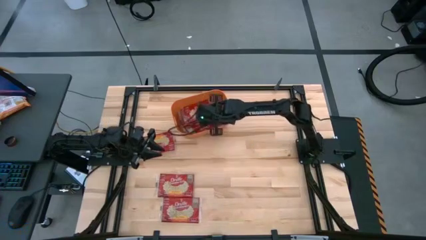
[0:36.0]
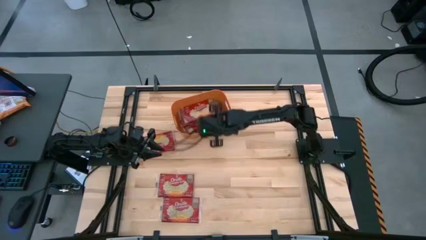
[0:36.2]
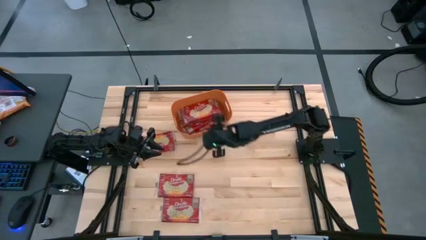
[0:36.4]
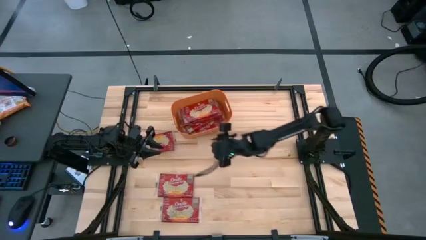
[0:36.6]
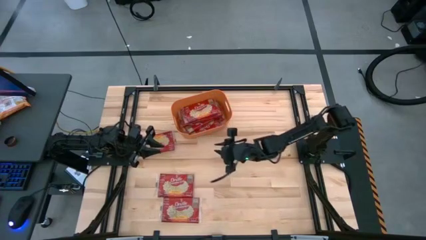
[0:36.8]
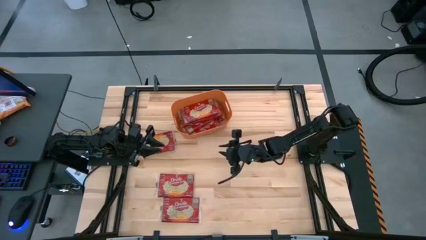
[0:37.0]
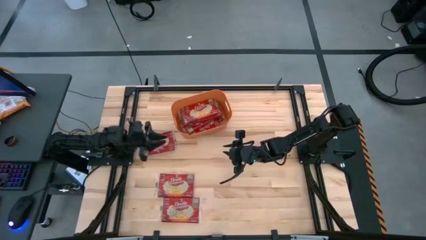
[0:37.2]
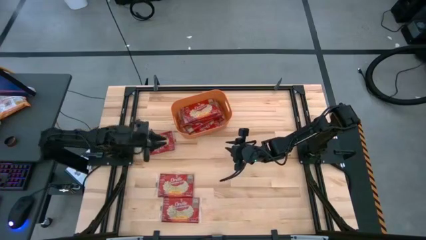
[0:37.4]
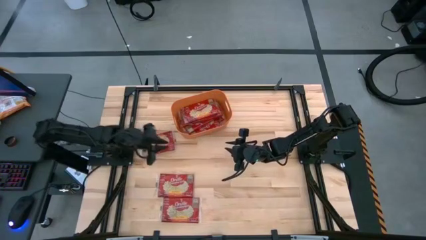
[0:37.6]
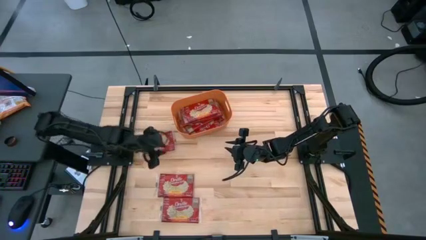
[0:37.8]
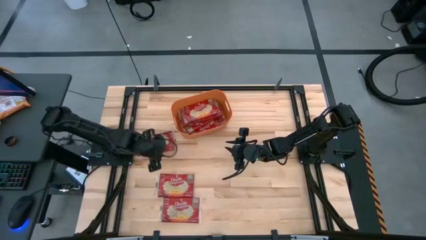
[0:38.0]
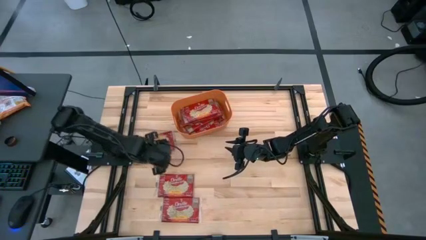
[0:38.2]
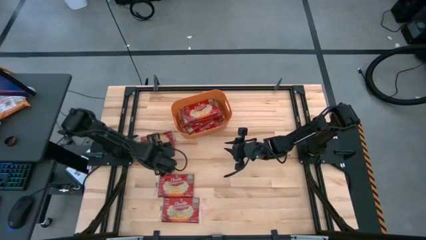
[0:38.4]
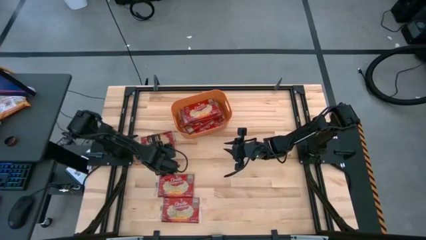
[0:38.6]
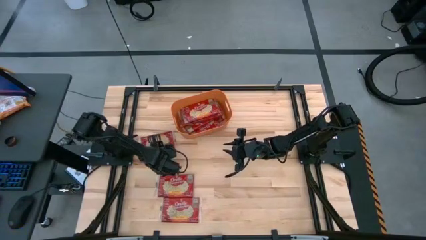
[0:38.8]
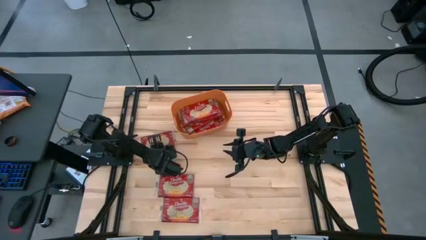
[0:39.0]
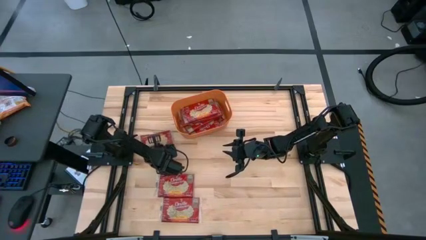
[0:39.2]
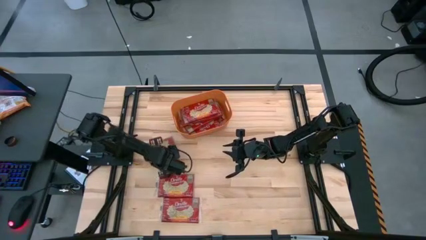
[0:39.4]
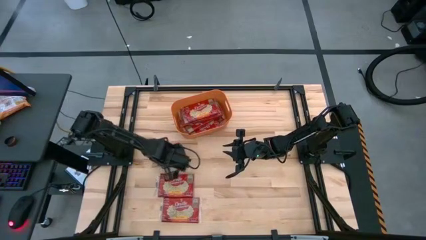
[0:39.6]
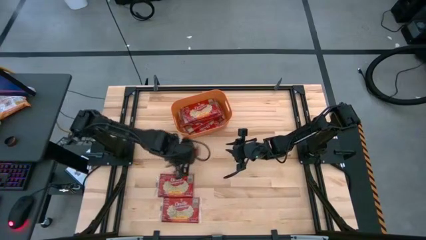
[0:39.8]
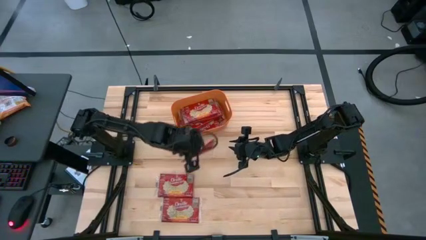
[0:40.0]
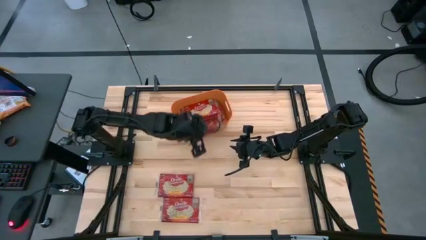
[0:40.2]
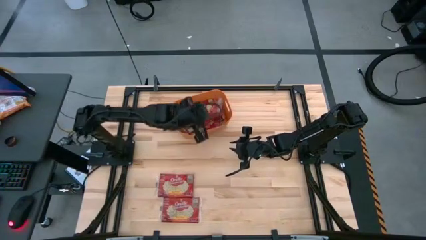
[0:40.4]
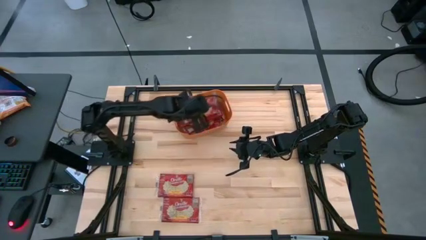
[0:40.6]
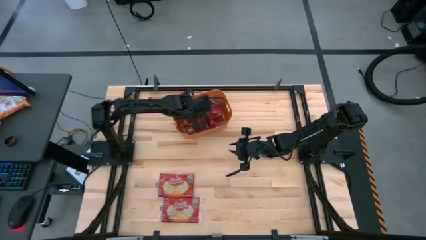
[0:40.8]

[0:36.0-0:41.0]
Task: Sort popcorn bags into baskets
Put the popcorn bag into the orange bin

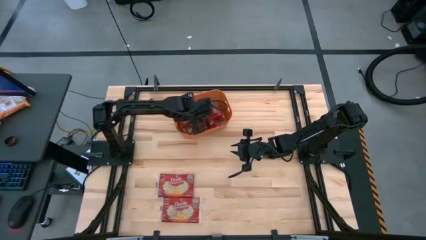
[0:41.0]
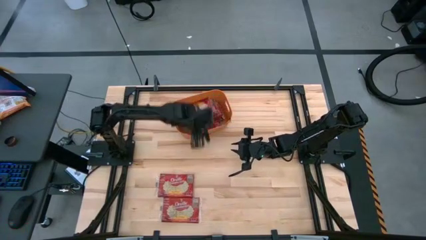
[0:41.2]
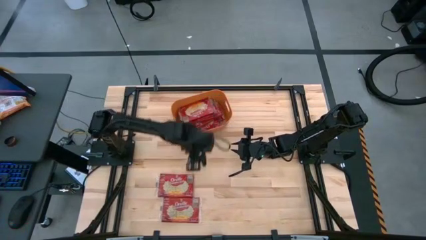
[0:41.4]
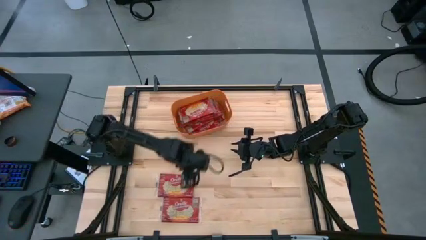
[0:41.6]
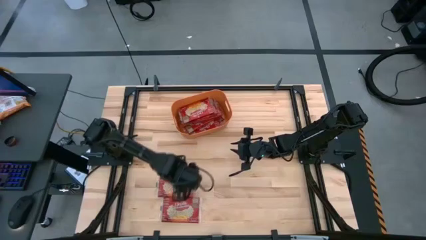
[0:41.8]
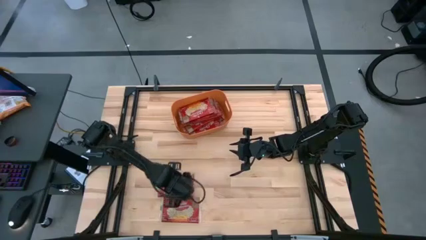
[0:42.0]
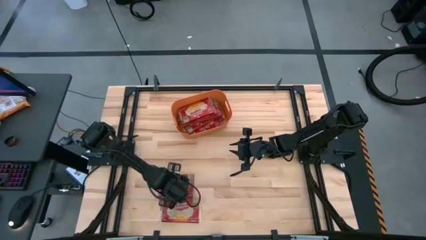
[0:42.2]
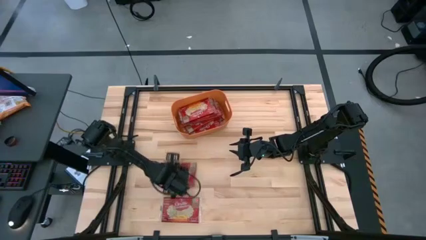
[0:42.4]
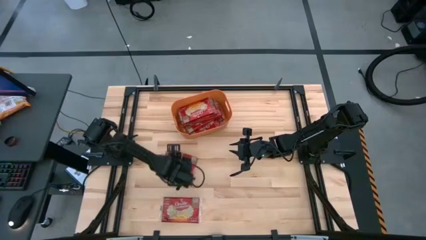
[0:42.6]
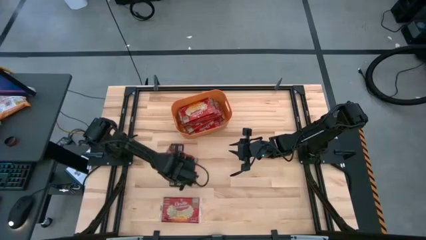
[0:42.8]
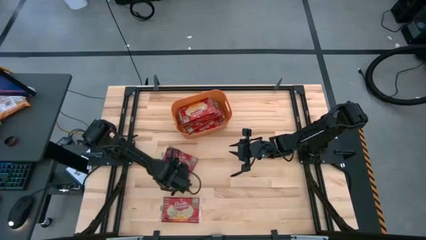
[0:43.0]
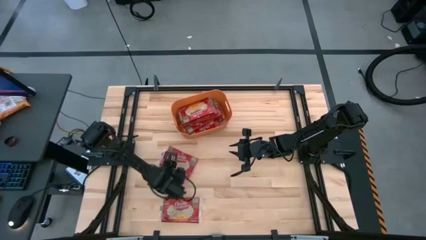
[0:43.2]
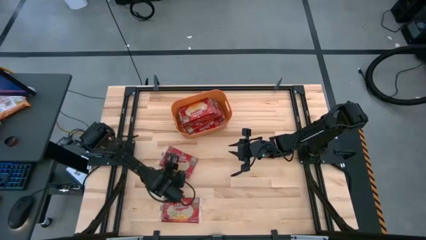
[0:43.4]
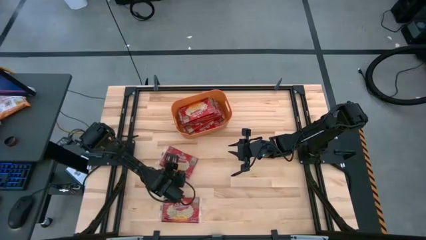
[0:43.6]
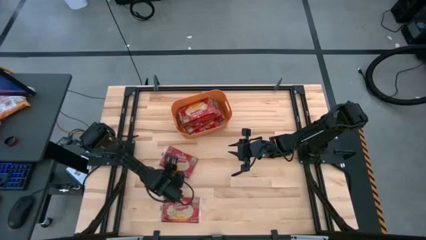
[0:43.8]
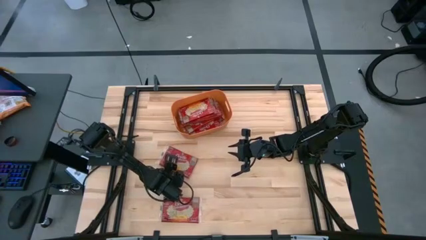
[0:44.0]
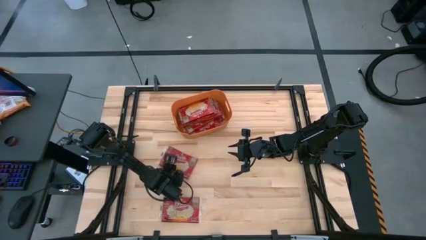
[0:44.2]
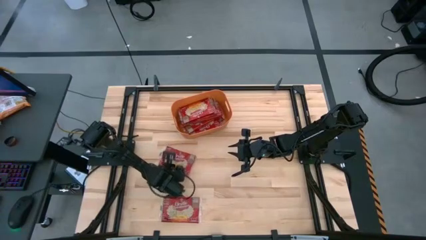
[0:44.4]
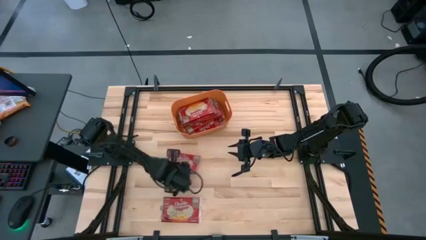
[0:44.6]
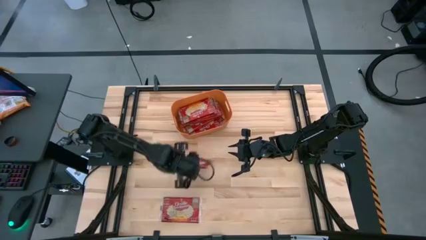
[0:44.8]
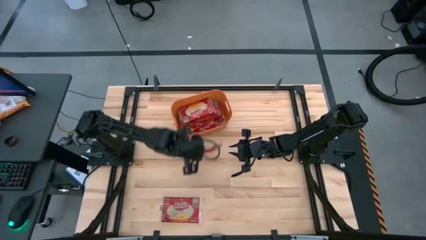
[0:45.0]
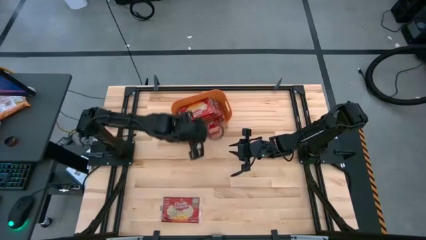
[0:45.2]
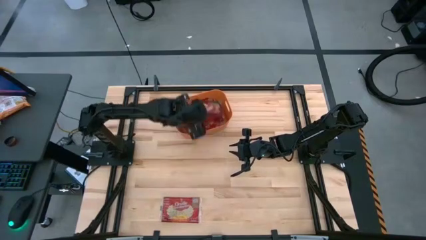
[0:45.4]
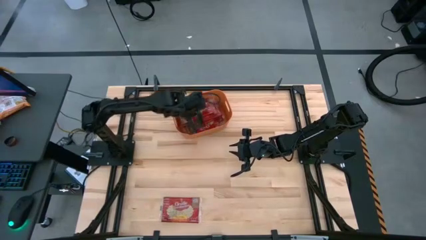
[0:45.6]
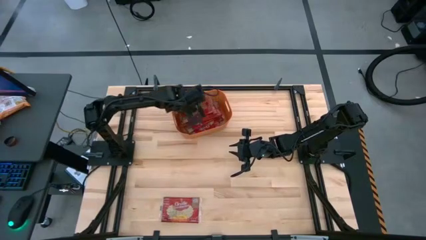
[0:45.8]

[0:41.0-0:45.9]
Put the popcorn bag into the orange bin

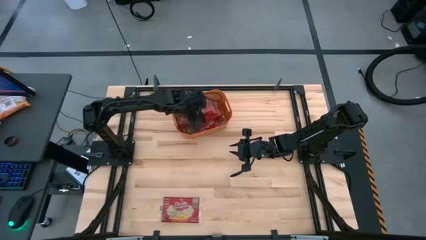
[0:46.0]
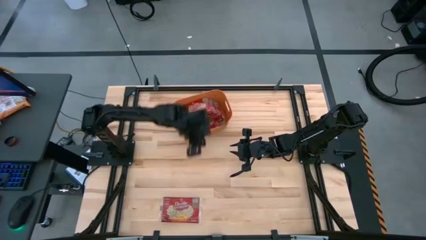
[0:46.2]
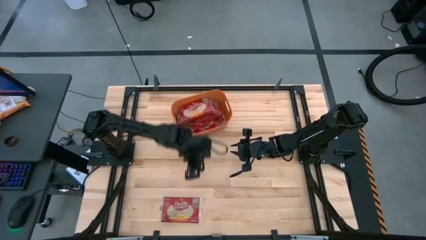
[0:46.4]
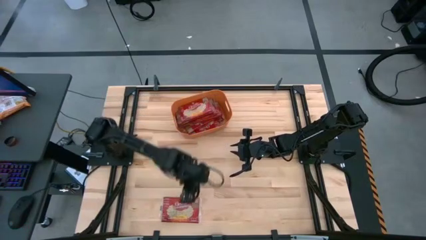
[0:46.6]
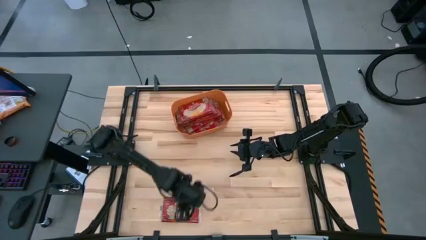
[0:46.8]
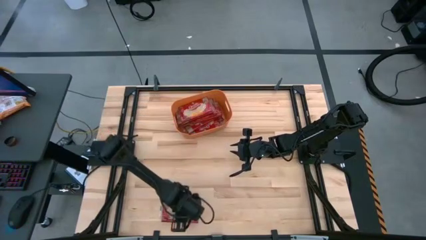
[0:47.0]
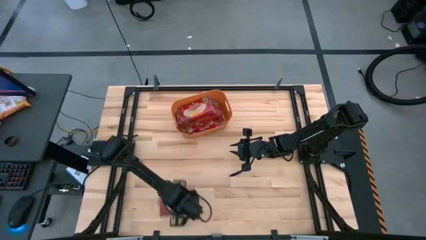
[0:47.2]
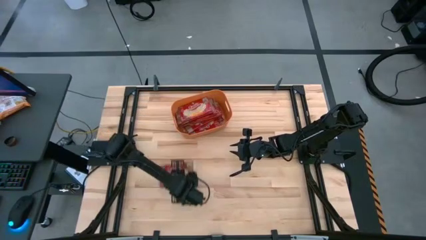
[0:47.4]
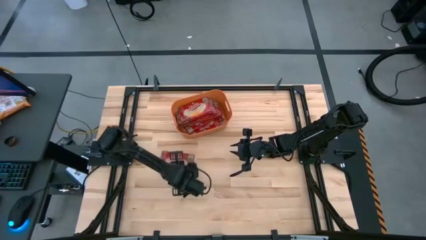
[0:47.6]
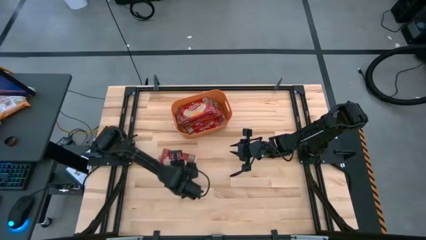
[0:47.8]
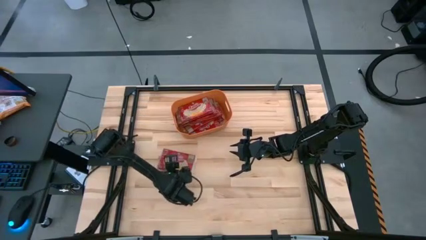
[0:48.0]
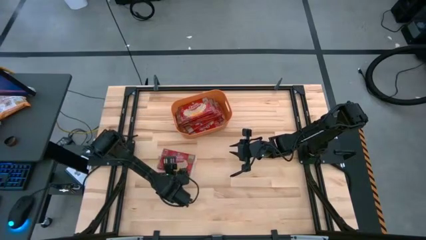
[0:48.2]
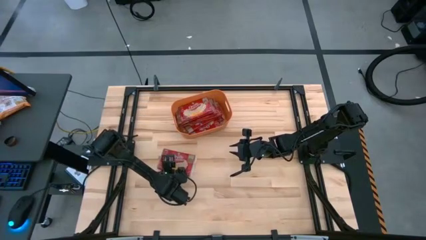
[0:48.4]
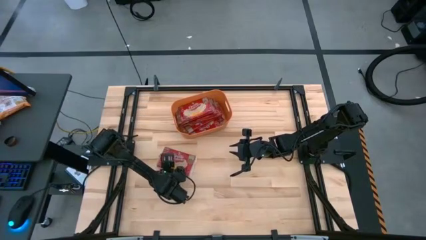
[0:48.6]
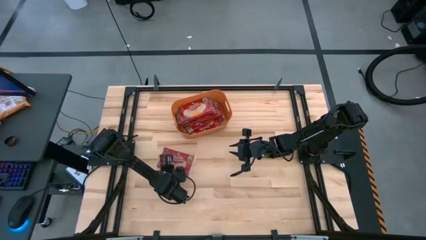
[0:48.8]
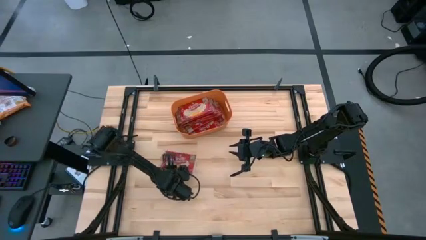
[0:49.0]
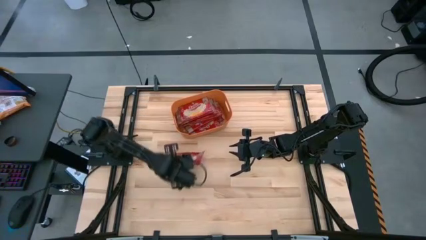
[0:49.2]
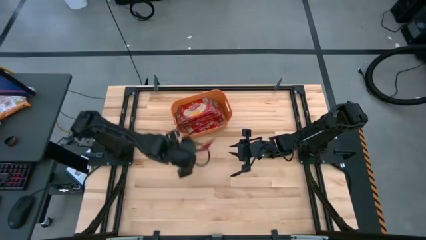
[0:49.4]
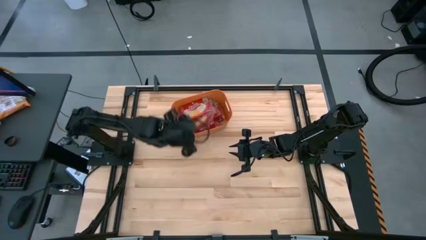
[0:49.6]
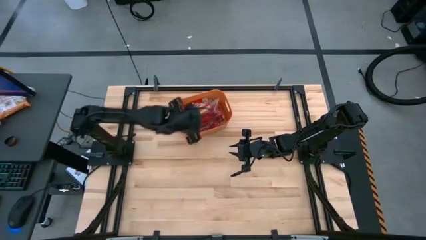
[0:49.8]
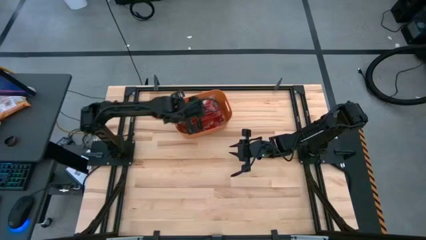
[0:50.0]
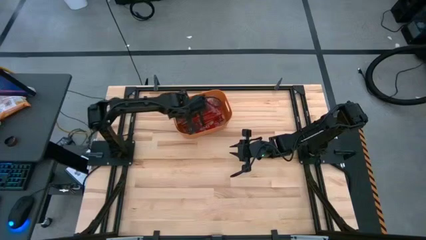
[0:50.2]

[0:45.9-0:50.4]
Put the popcorn bag into the orange bin

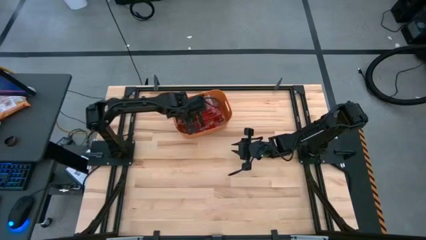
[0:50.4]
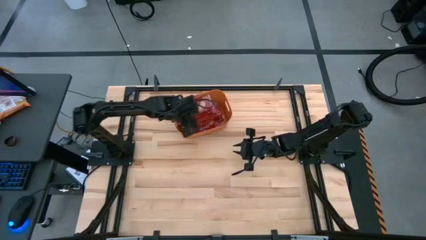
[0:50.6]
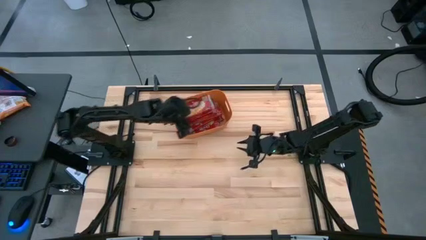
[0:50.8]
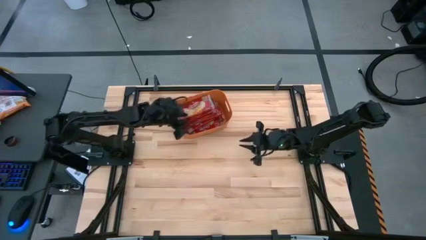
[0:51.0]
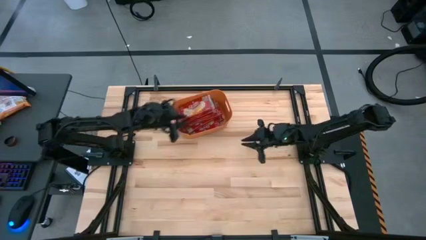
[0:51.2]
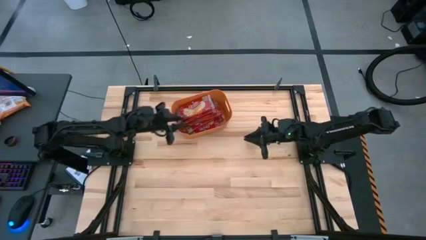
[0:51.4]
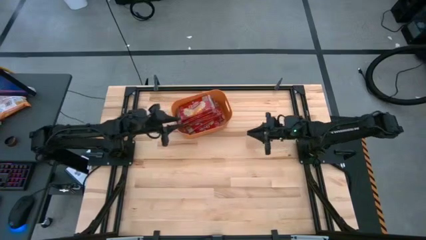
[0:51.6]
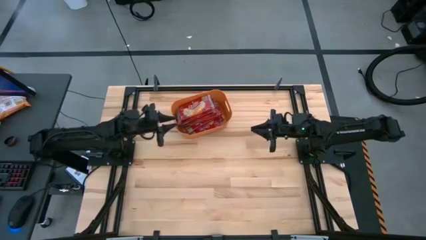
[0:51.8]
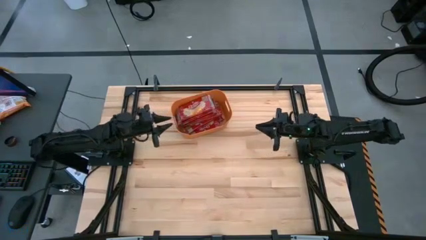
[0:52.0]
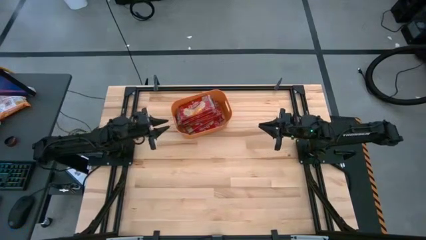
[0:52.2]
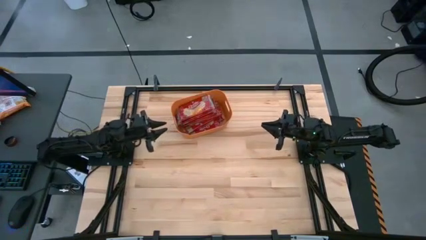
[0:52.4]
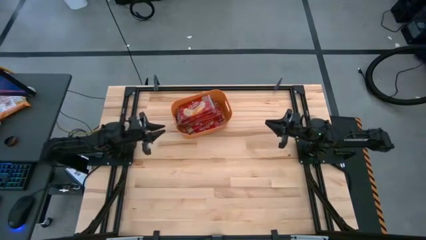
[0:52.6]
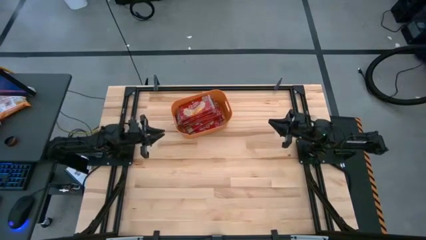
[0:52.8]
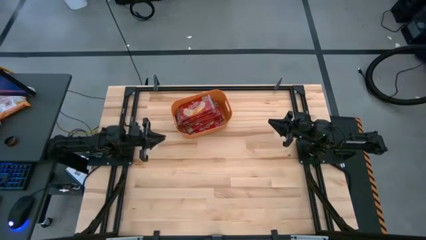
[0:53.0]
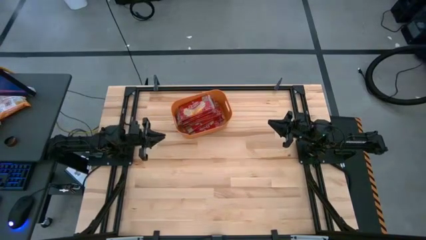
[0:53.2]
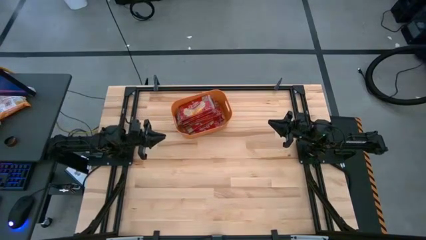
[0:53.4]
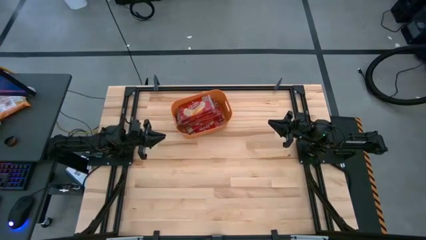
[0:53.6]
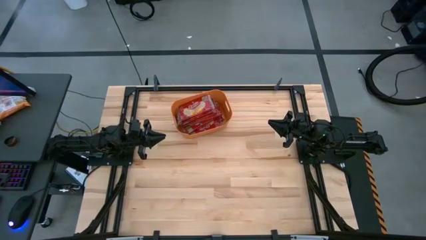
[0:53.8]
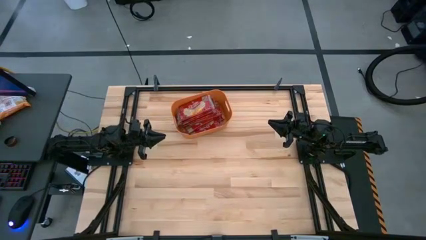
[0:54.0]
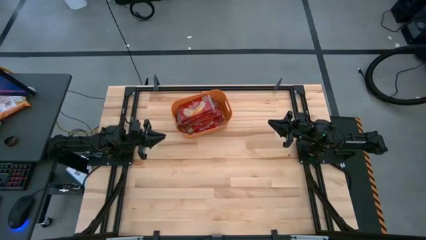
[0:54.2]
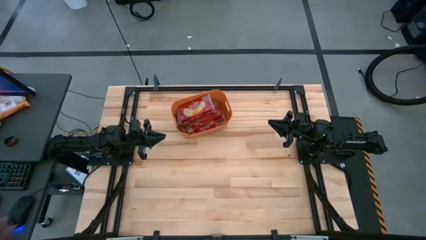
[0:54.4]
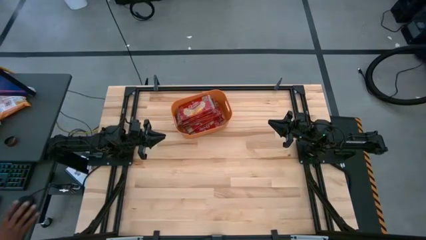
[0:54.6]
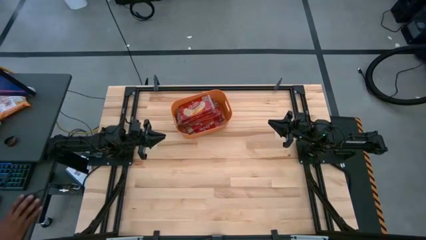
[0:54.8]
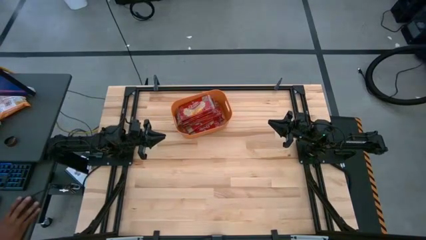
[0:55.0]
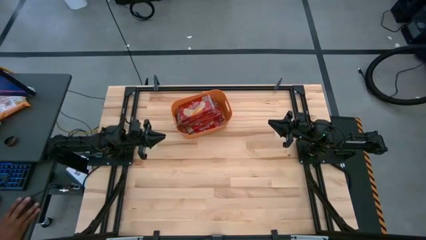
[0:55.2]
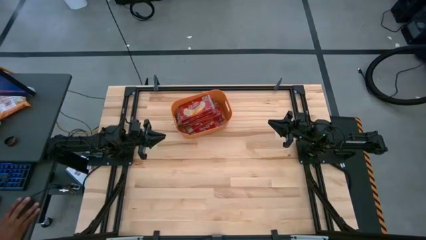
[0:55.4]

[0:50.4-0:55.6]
Return to Home Position
